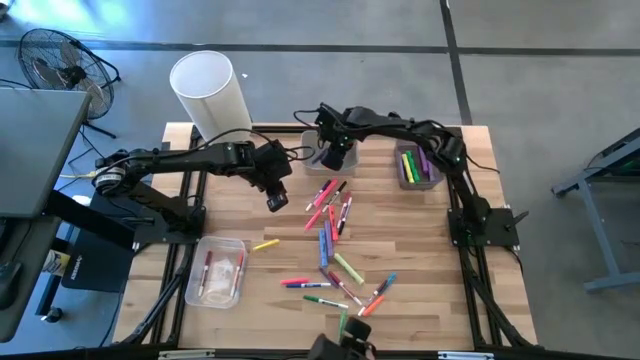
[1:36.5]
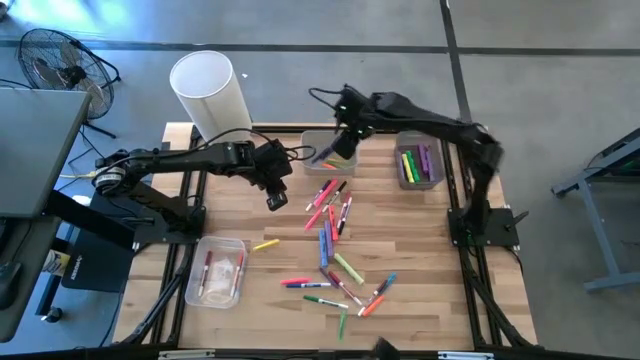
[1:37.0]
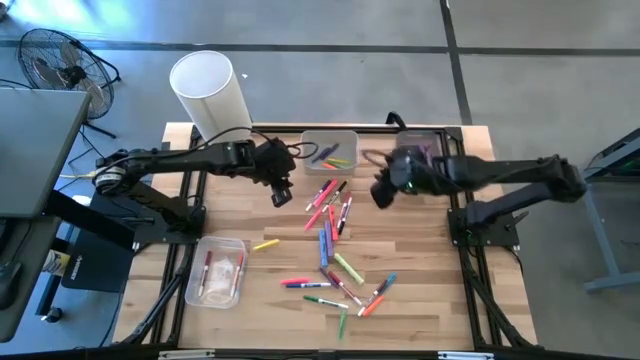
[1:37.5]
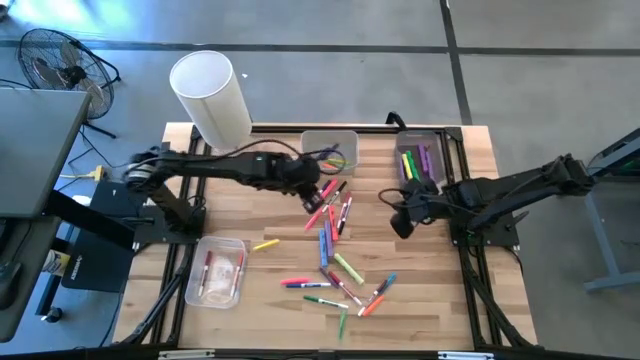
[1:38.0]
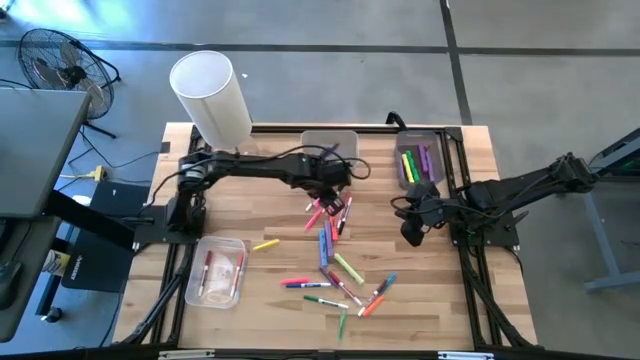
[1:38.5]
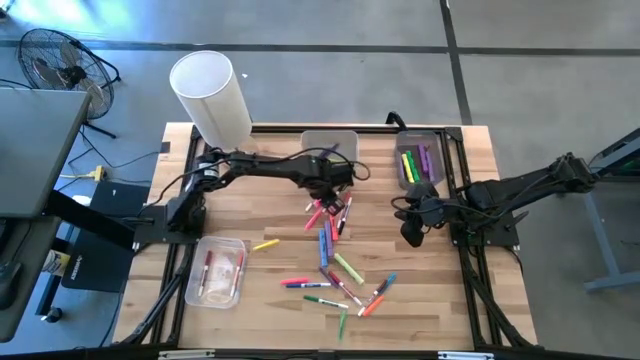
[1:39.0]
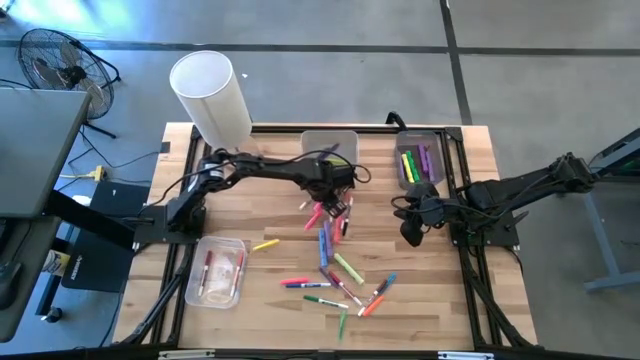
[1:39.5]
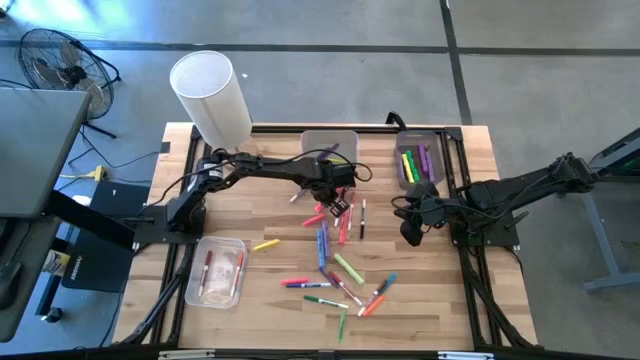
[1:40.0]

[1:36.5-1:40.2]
Task: Pick & Place Markers
Put the pink highlighter pen into the black bin

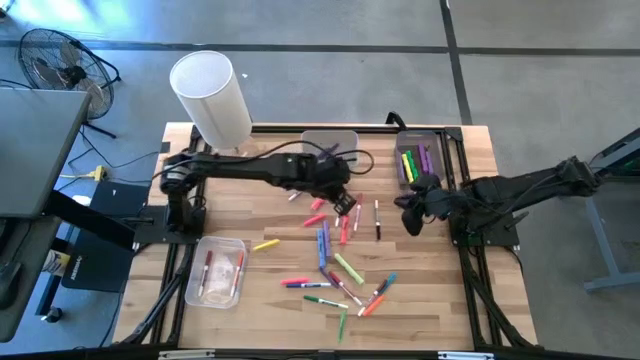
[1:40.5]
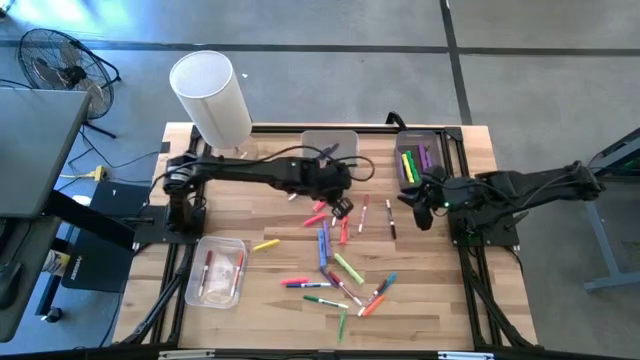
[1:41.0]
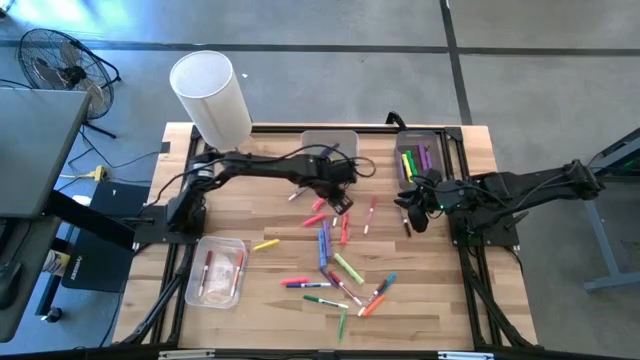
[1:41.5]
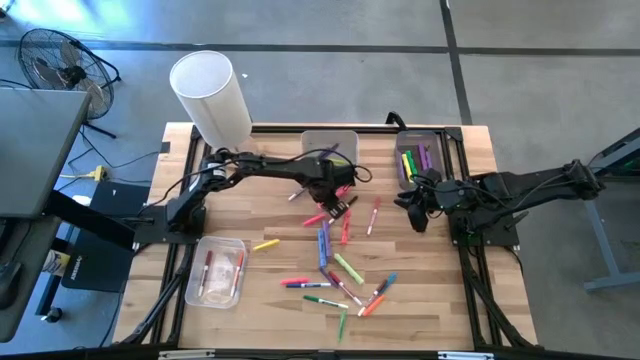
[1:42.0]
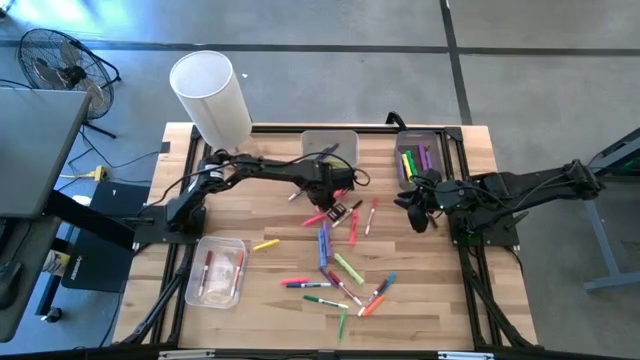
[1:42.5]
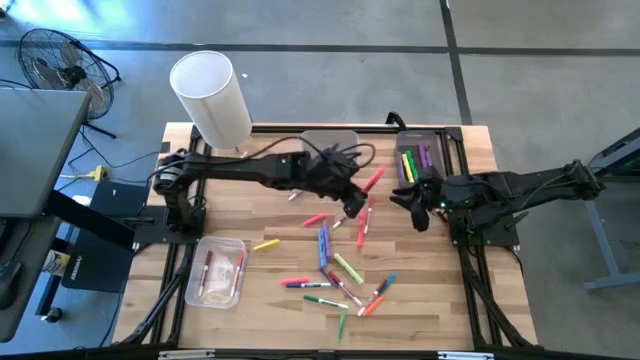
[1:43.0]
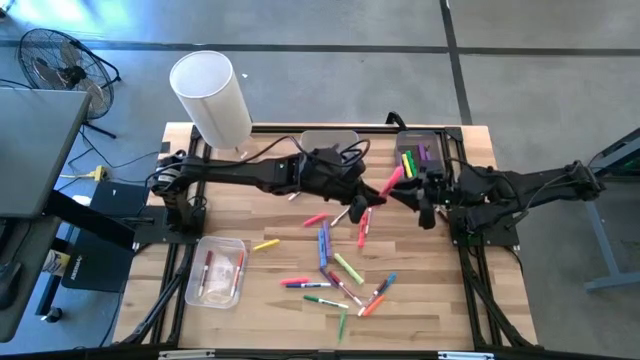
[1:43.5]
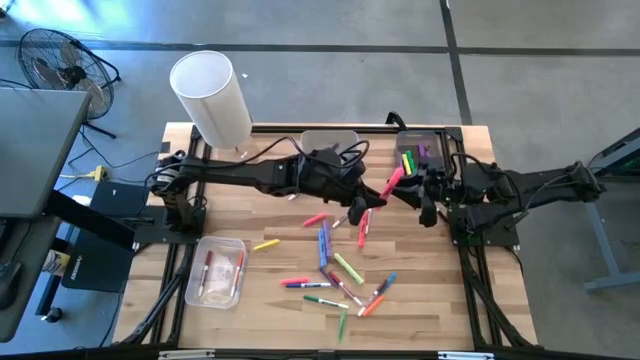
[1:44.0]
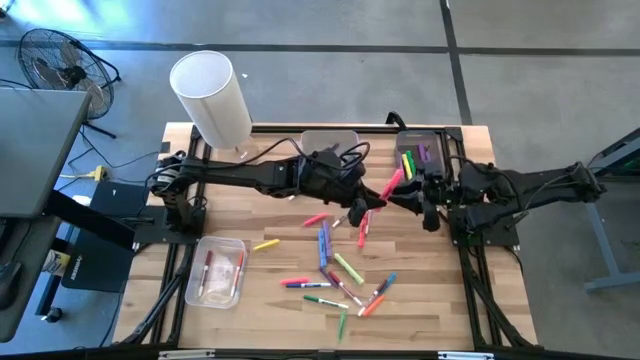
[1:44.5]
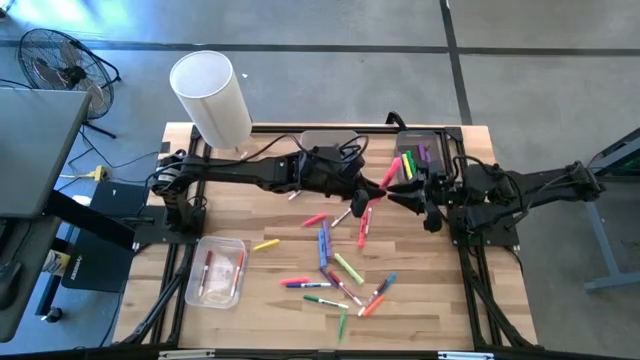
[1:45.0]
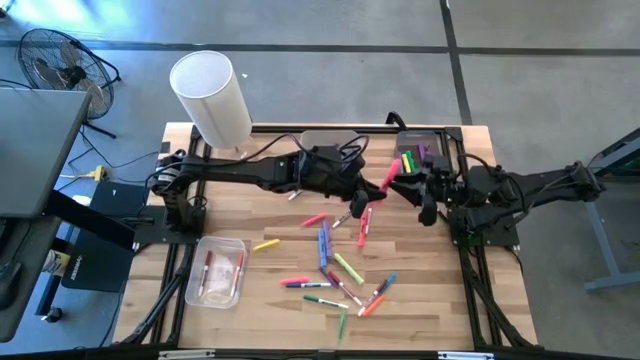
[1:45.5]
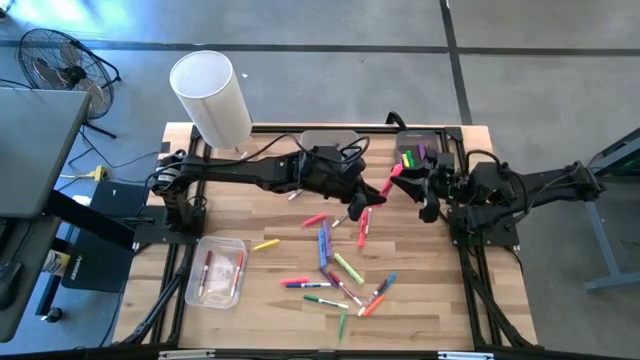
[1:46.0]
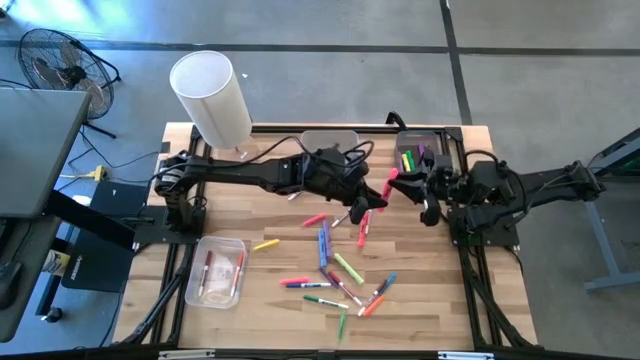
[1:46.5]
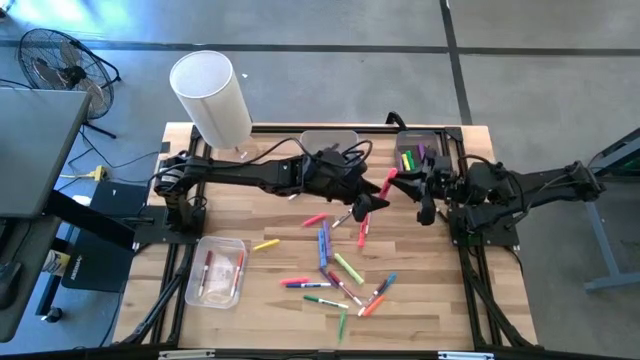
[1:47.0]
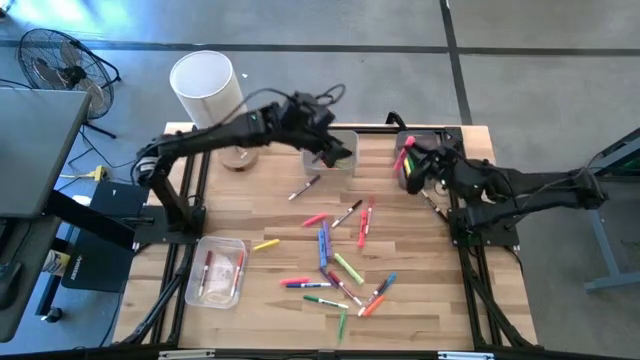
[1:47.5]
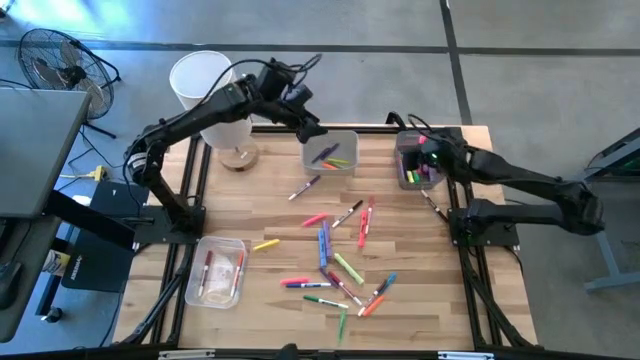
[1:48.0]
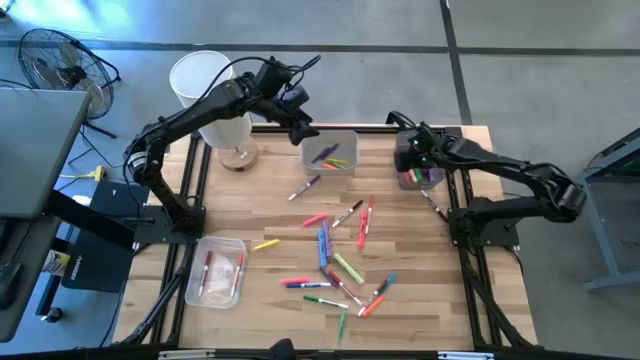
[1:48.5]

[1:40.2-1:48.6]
Put the pink highlighter pen into the black bin

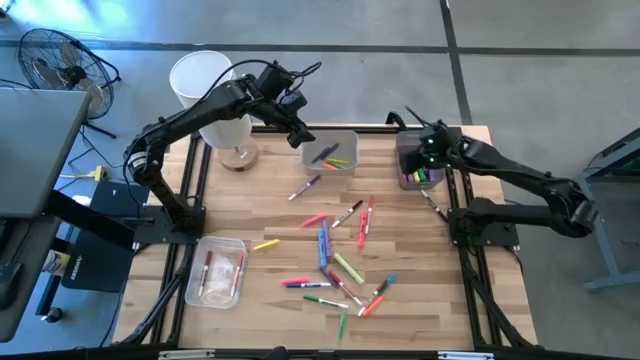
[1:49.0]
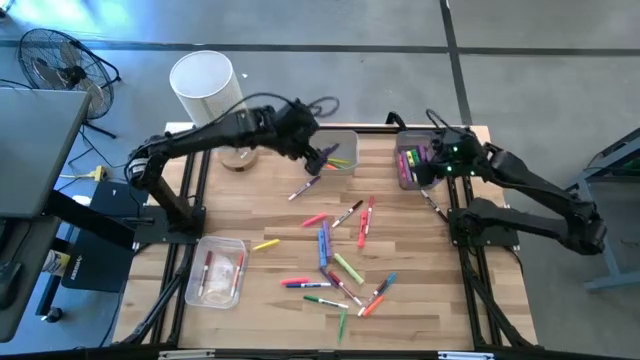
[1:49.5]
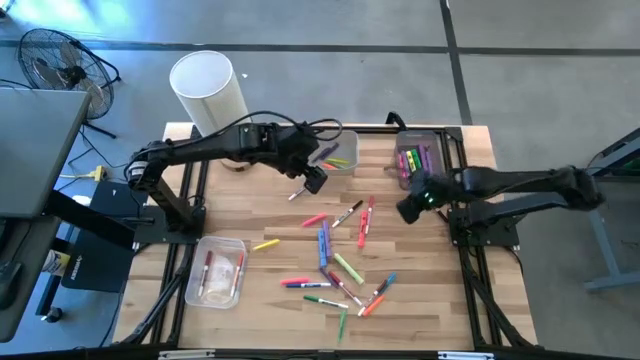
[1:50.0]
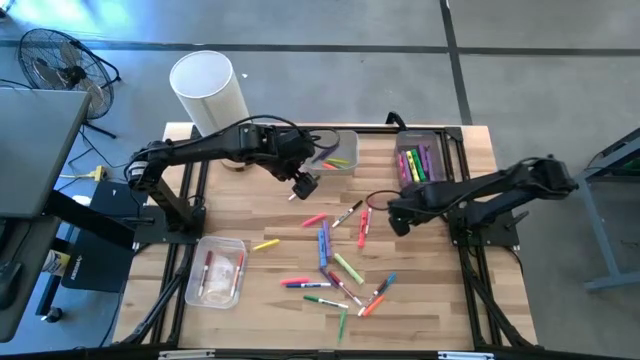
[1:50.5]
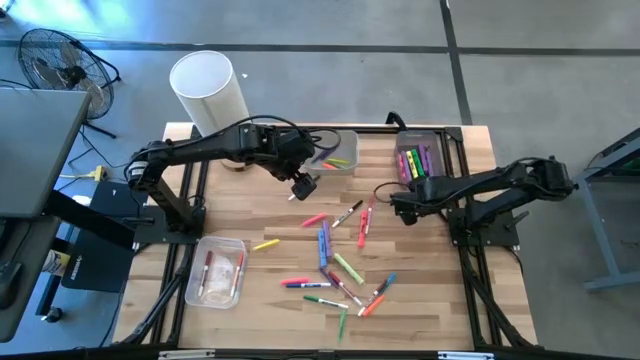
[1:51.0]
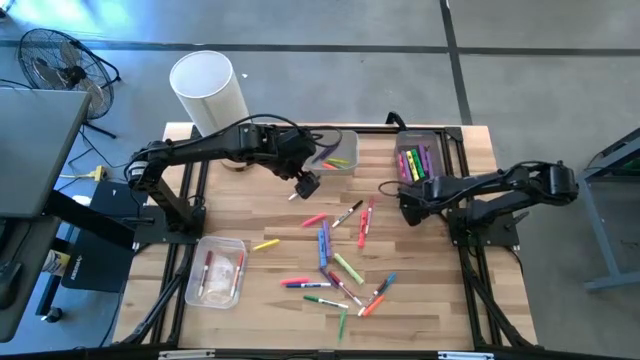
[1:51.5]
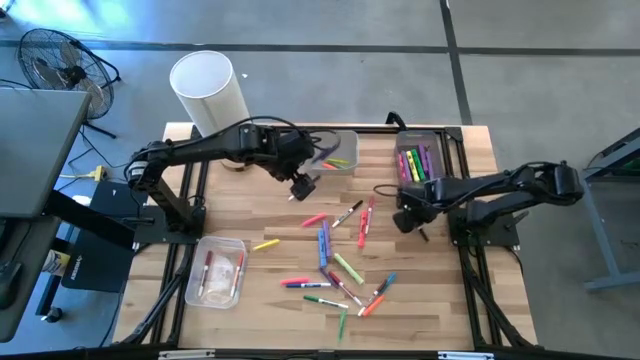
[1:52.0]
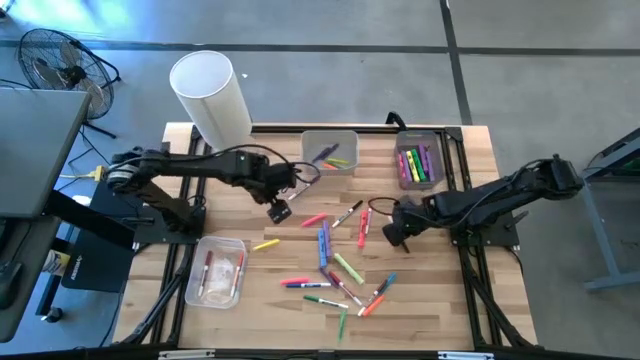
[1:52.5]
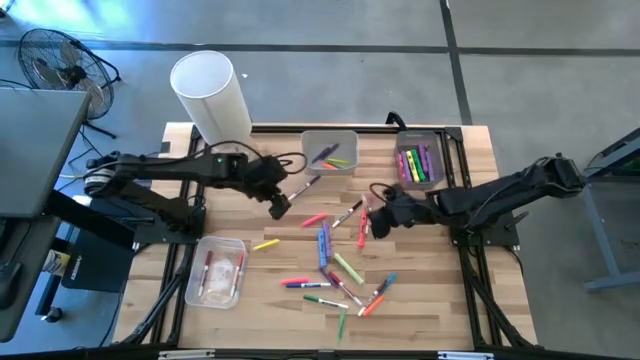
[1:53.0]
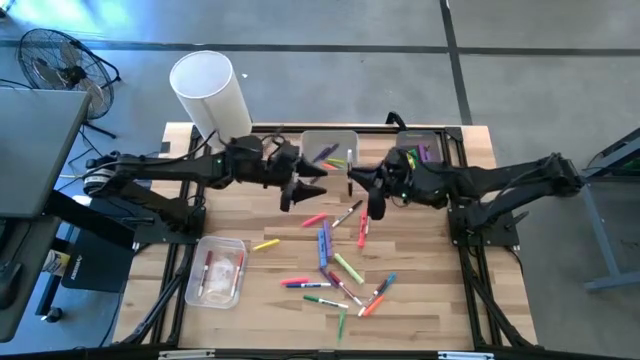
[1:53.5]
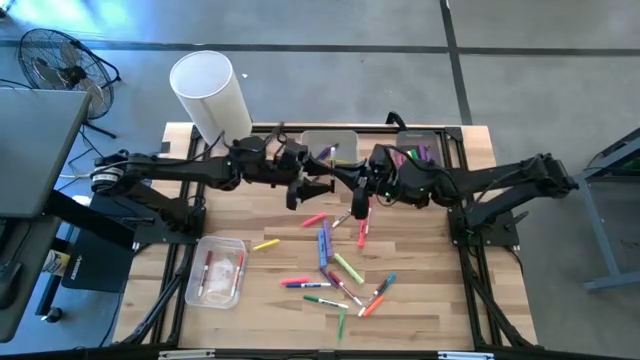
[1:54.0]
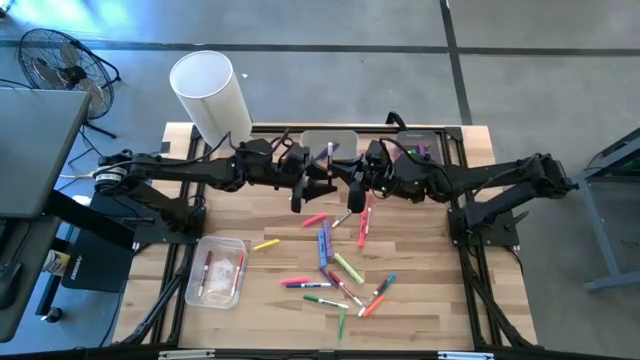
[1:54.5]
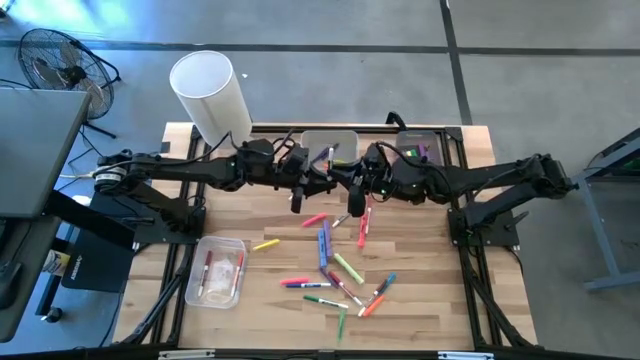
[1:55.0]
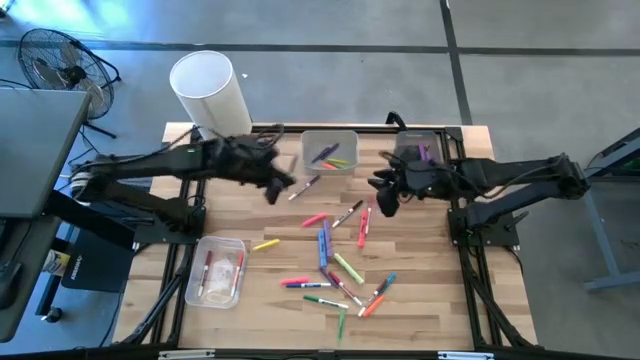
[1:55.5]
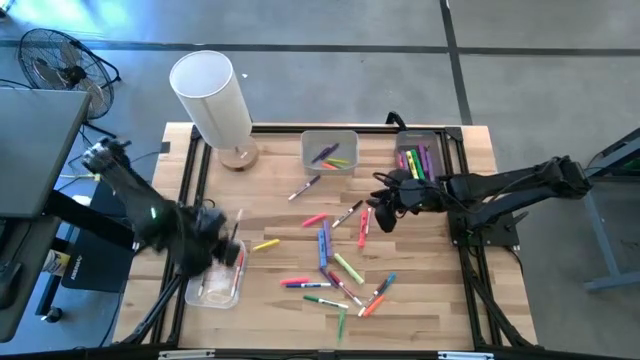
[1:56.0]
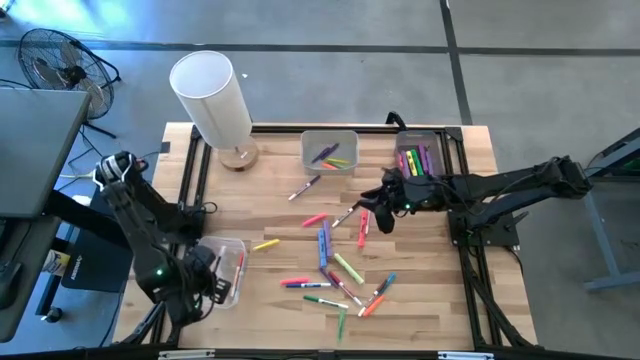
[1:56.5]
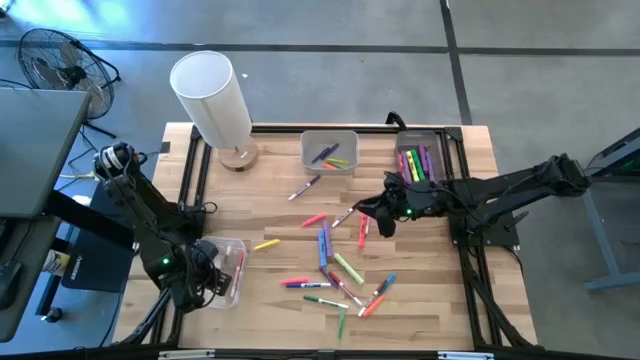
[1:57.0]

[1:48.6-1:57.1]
Put the black marker pen into the transparent bin
